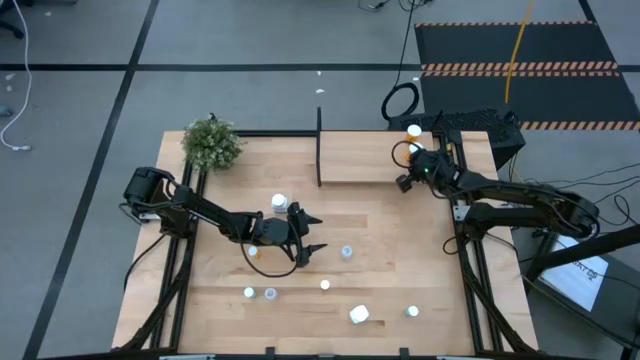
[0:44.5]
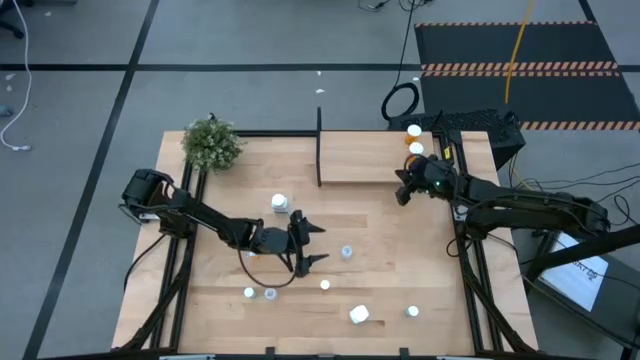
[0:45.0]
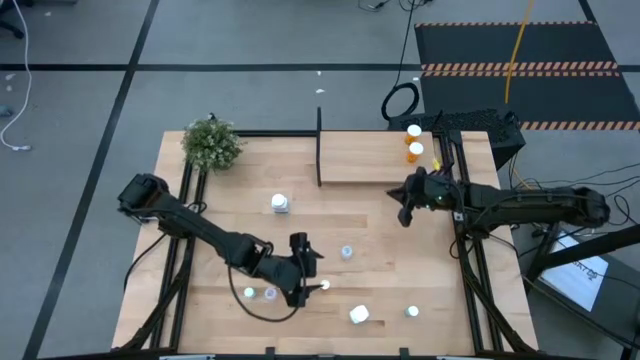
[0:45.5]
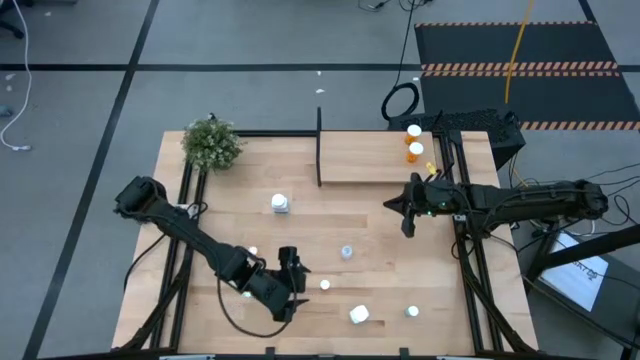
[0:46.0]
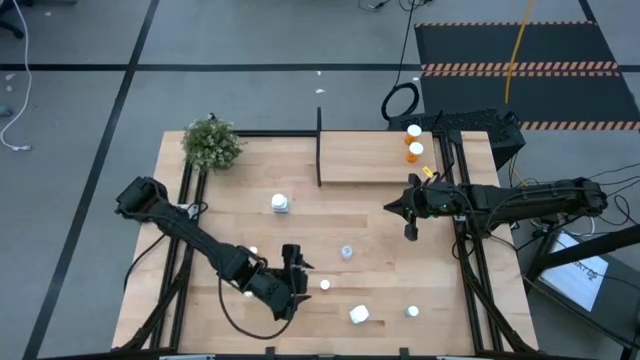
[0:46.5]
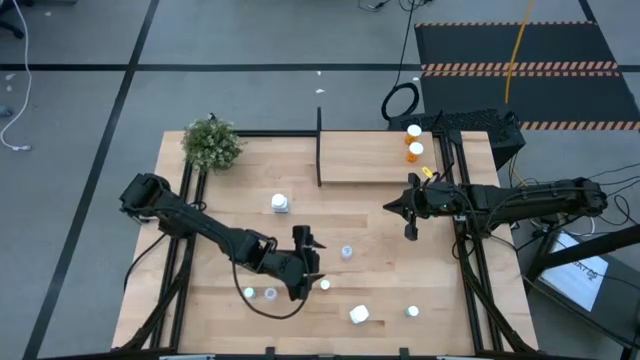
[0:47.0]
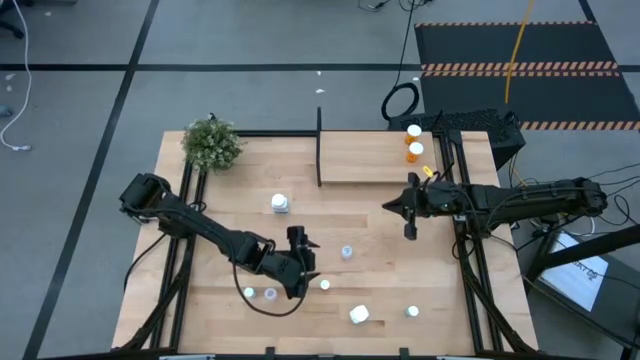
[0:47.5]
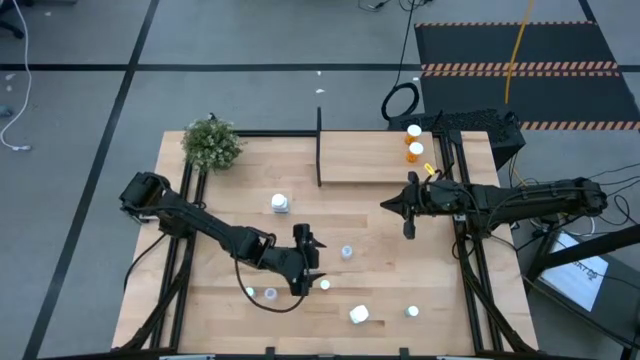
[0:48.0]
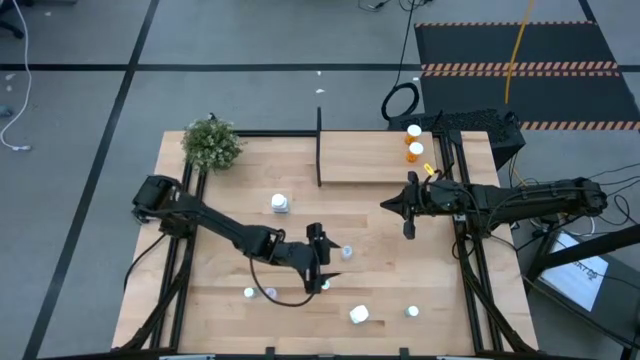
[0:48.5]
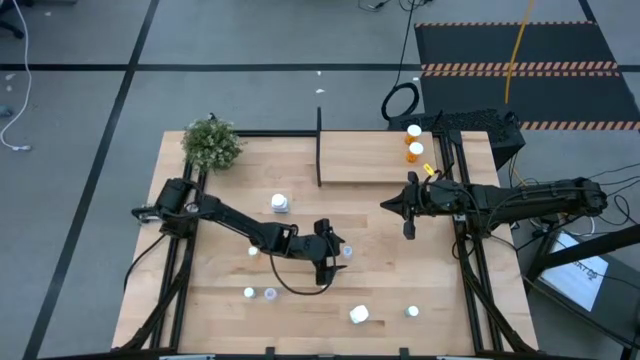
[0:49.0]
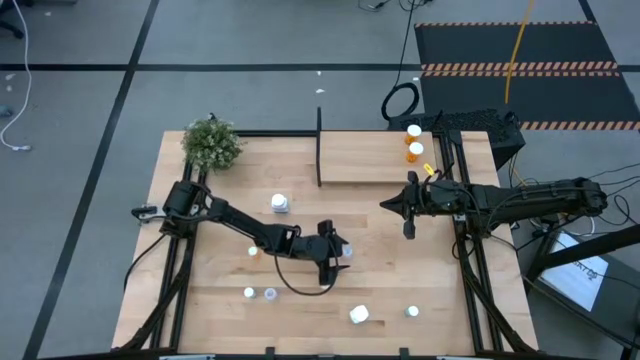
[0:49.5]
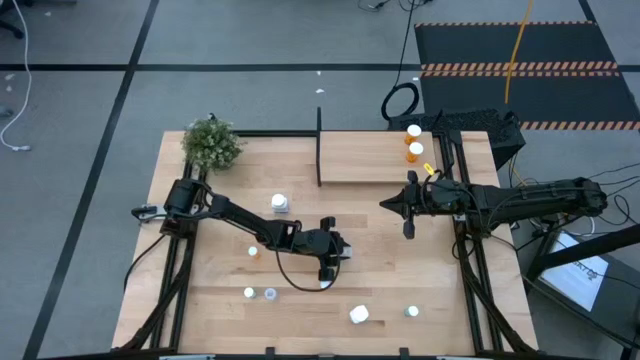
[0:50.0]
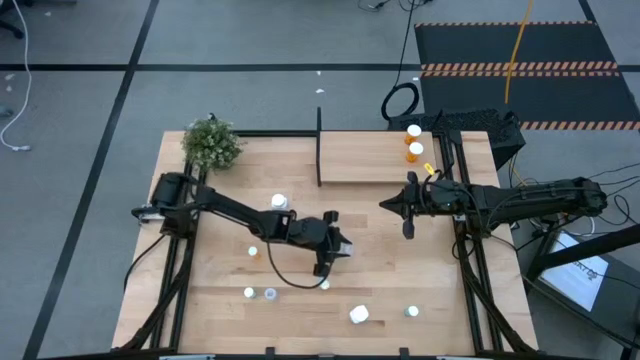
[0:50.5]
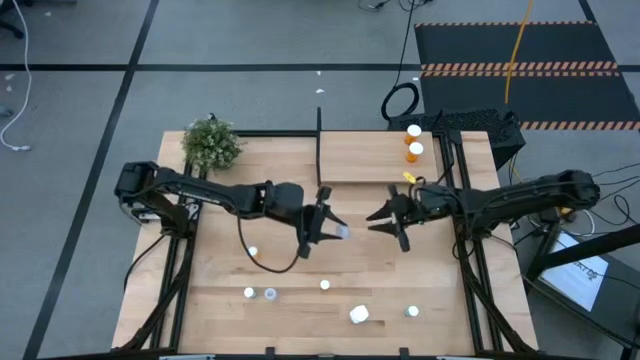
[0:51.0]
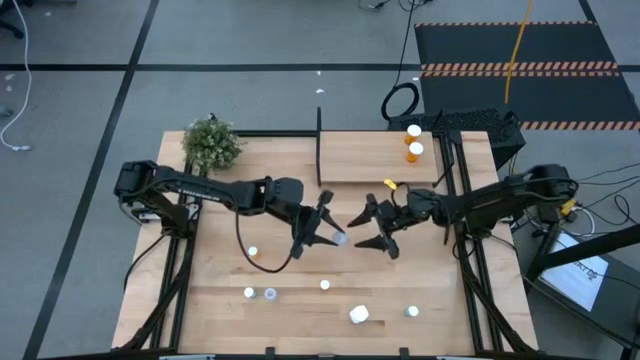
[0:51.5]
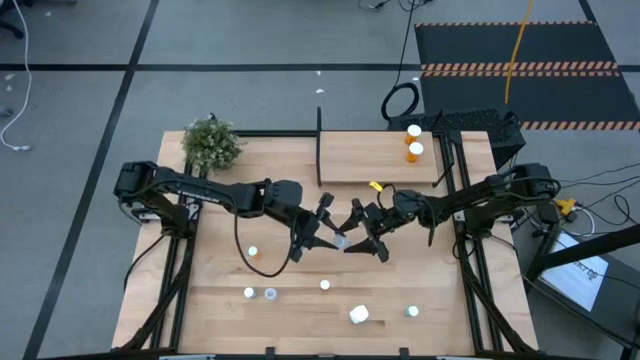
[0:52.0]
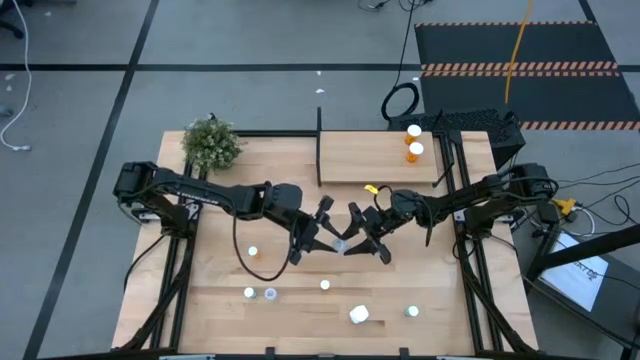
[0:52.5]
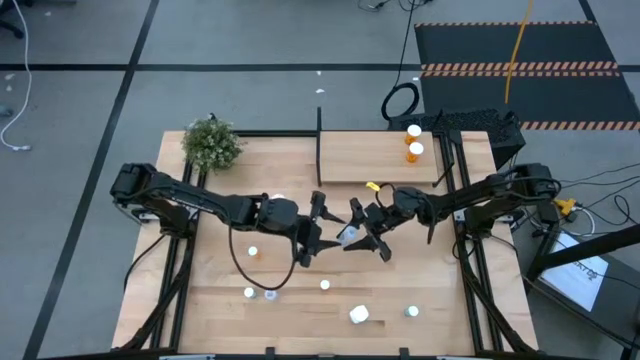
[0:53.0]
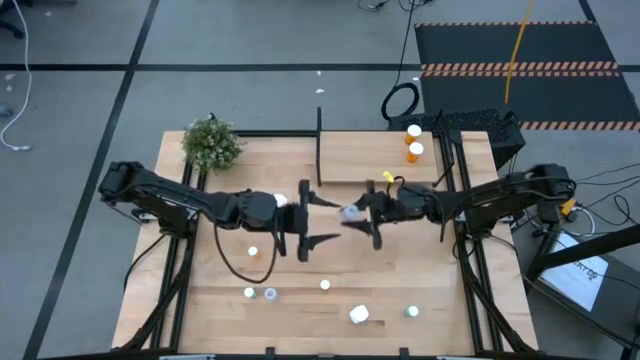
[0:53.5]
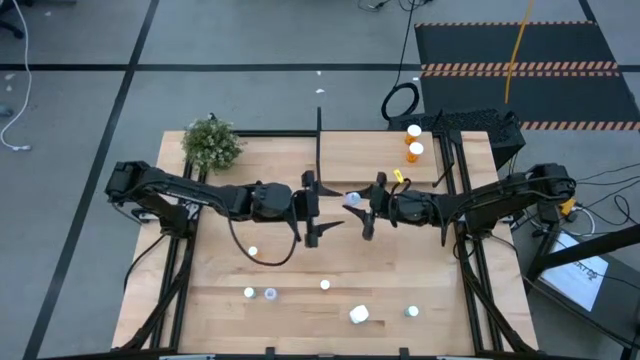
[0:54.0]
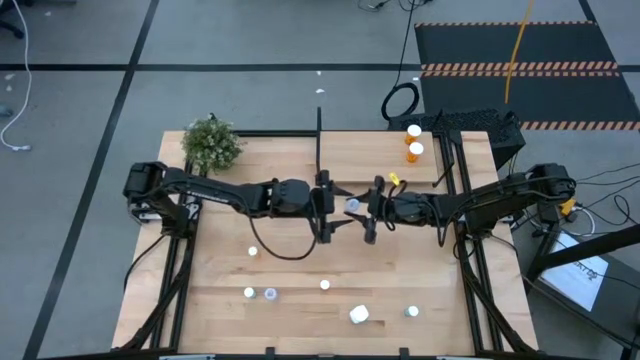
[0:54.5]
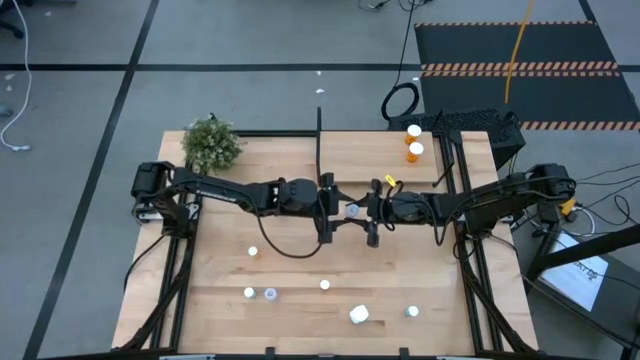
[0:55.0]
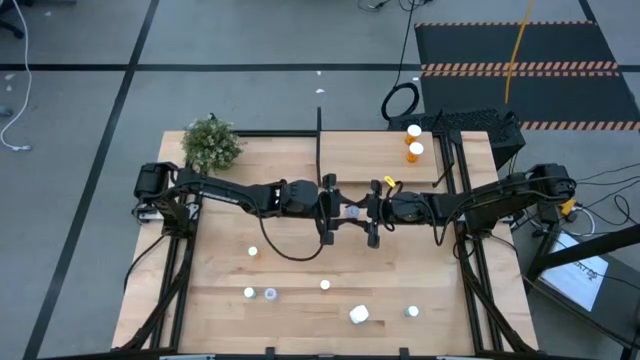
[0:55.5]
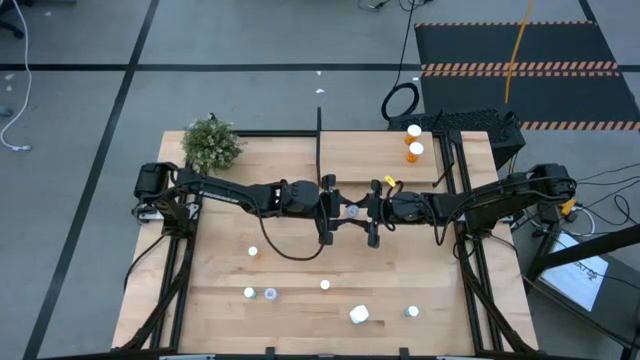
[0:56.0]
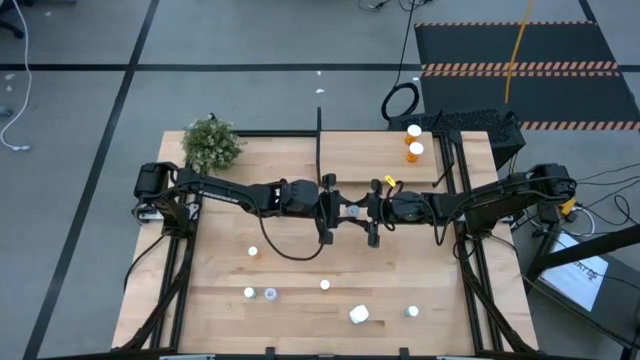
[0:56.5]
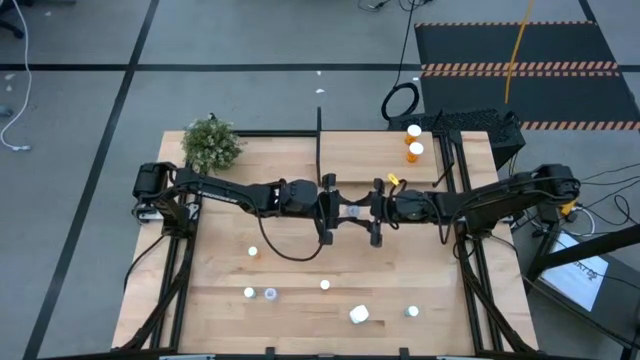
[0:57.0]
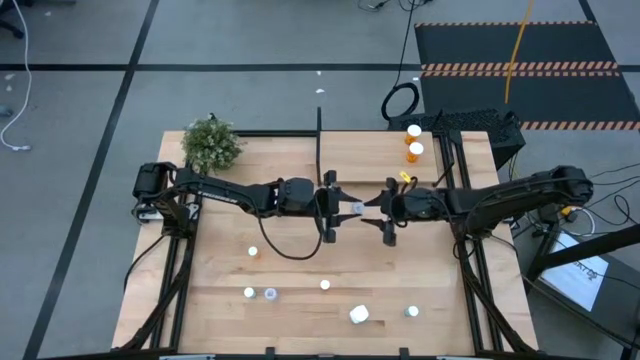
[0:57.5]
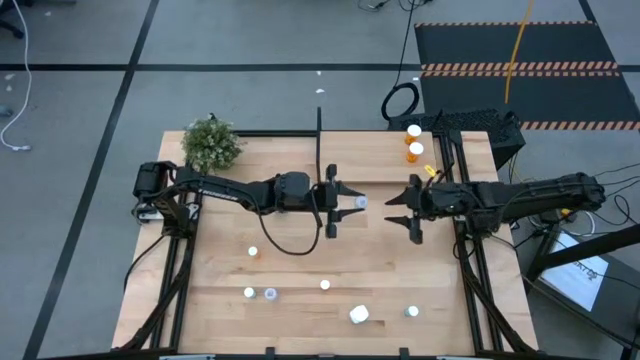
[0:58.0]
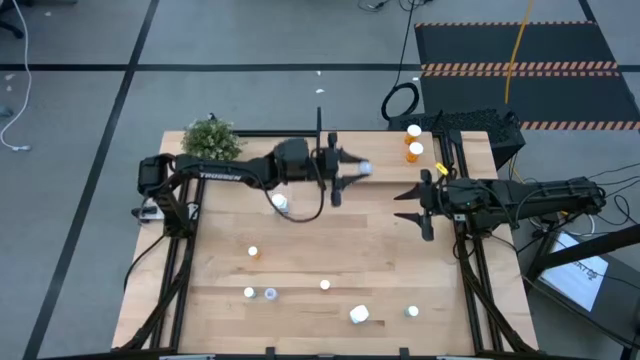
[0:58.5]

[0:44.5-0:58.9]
Task: Pick and place medicine bottles onto shelf by color
Put the right transparent pill bottle on the shelf
